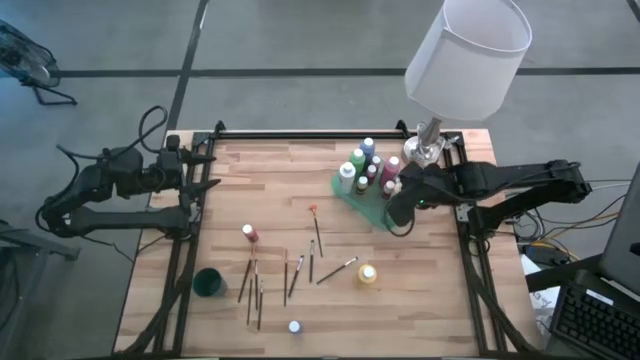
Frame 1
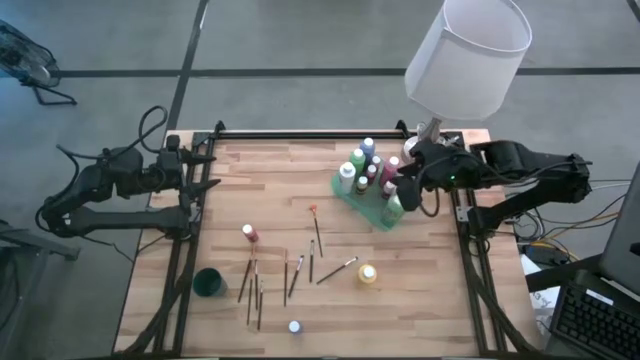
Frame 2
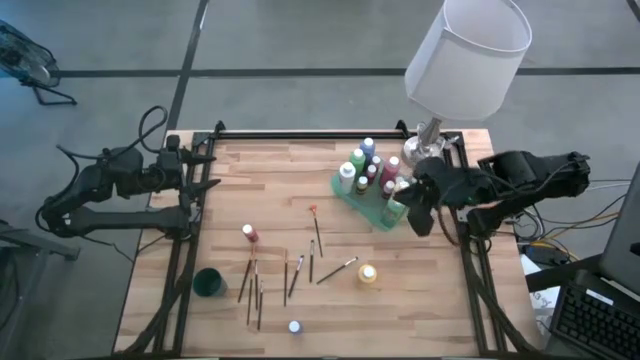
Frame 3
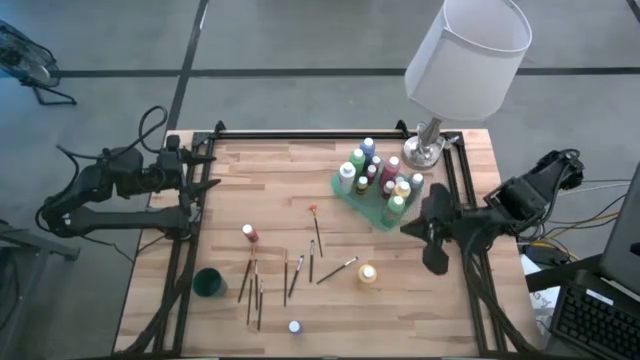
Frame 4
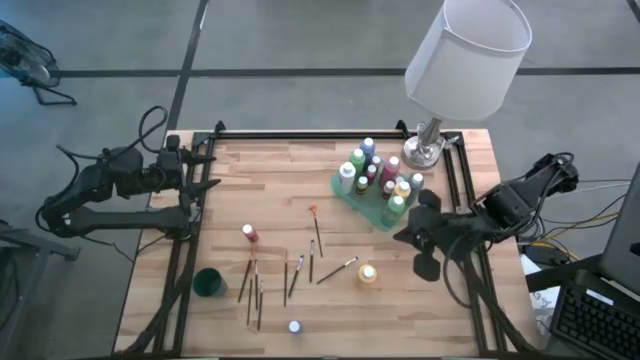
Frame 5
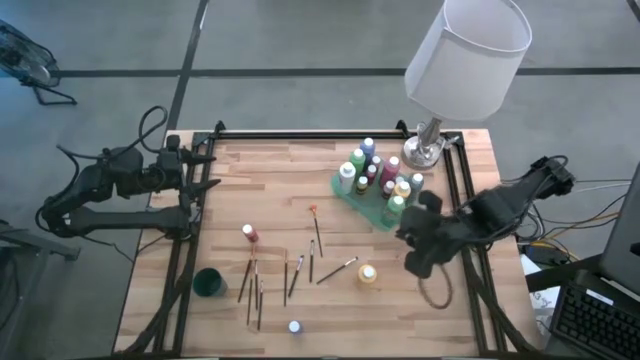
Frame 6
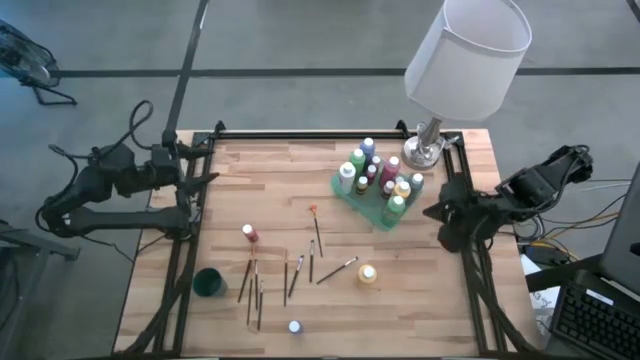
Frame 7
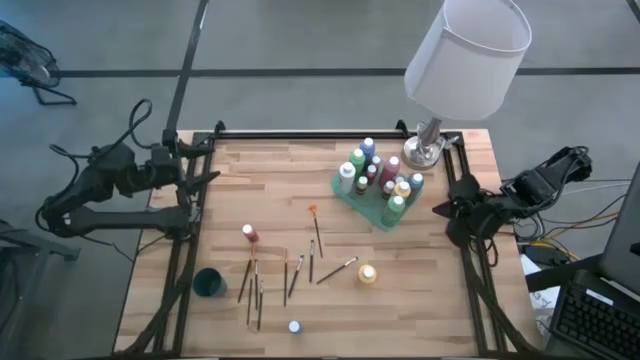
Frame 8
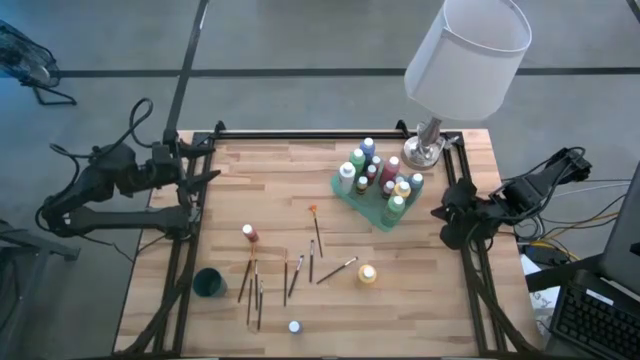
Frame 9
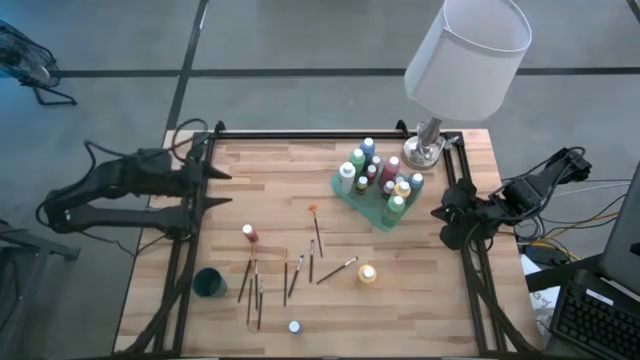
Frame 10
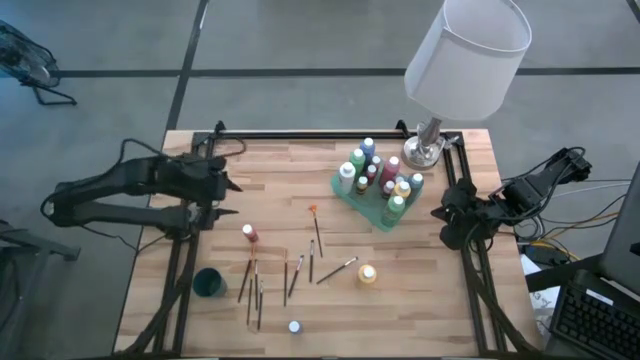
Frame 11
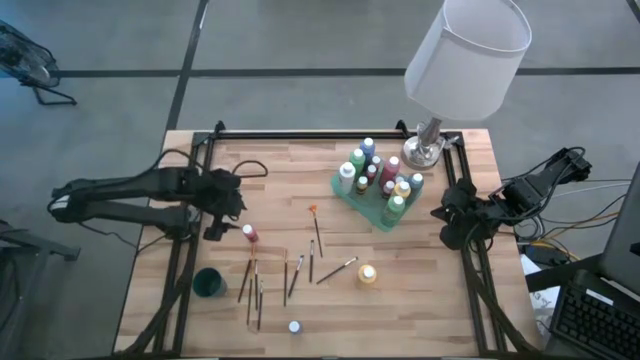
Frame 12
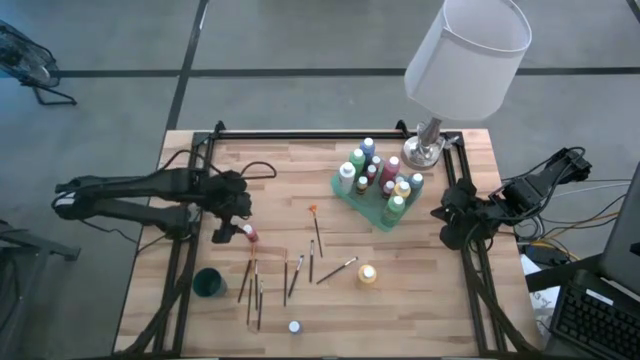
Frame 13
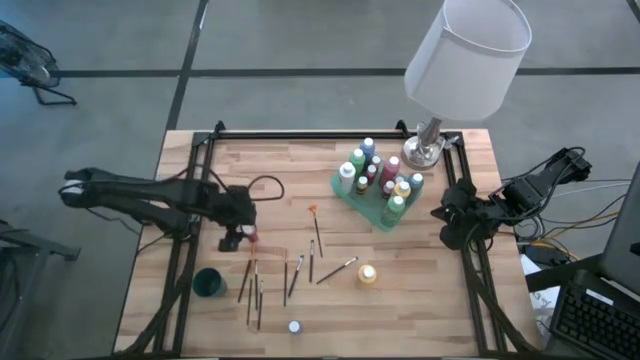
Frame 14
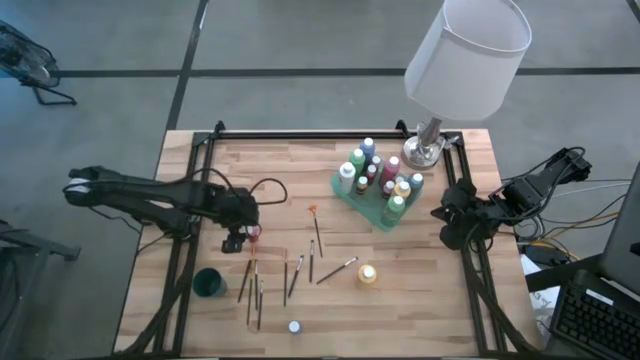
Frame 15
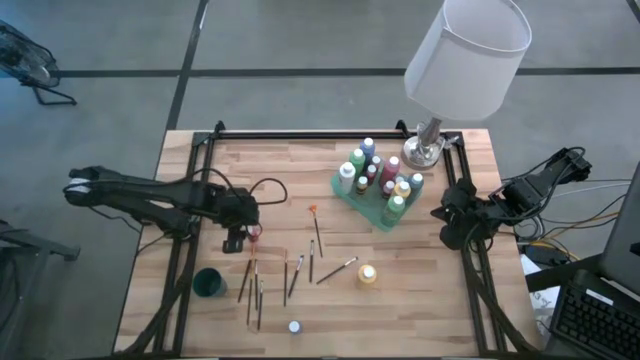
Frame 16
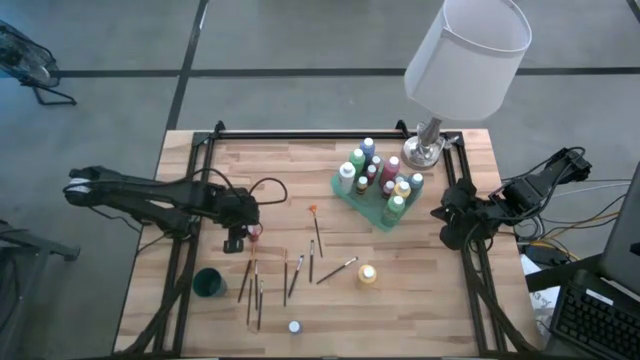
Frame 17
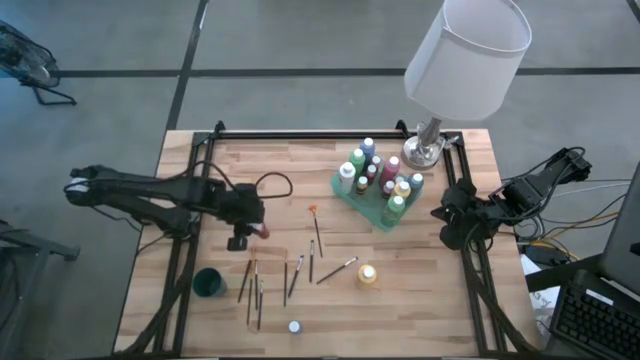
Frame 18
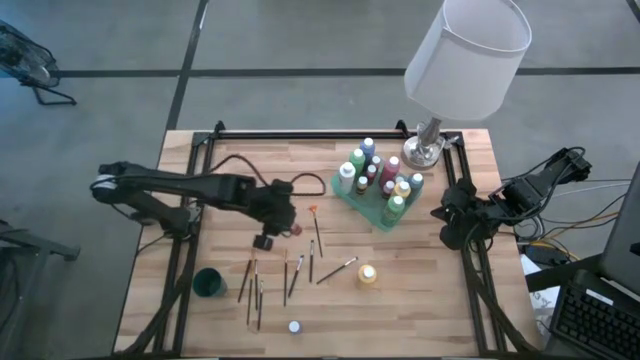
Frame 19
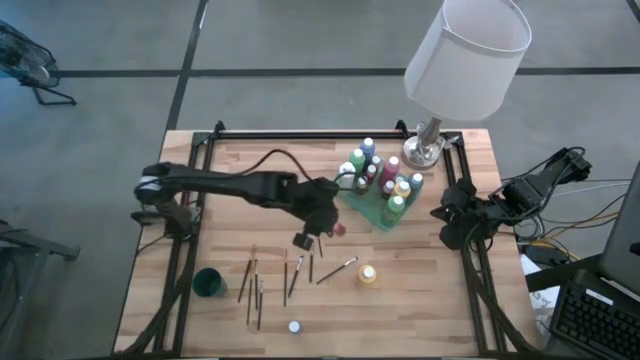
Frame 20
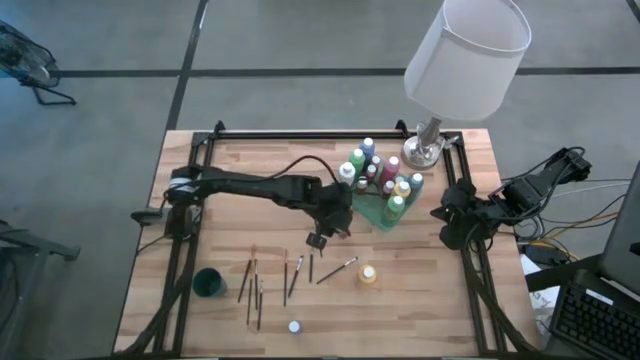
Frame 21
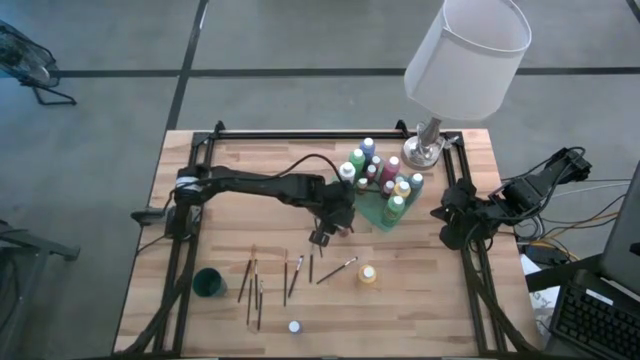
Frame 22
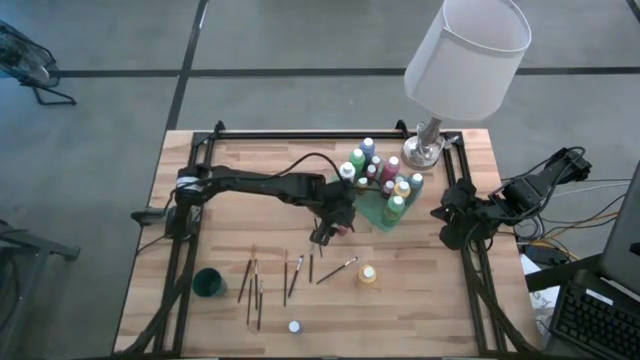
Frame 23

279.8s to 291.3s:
Task: Pick & Place Paint Supplies
Move the small orange paint bottle to the center of the table

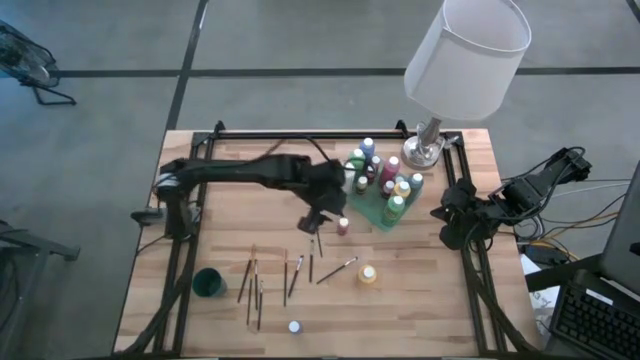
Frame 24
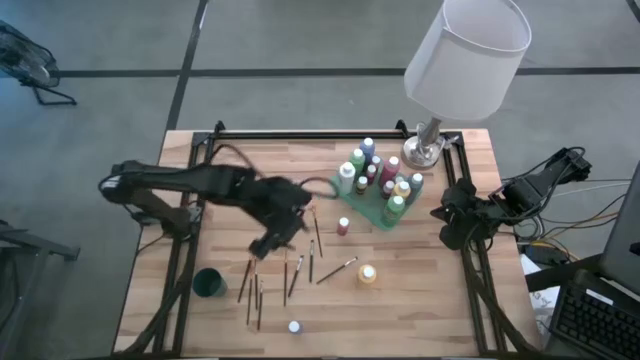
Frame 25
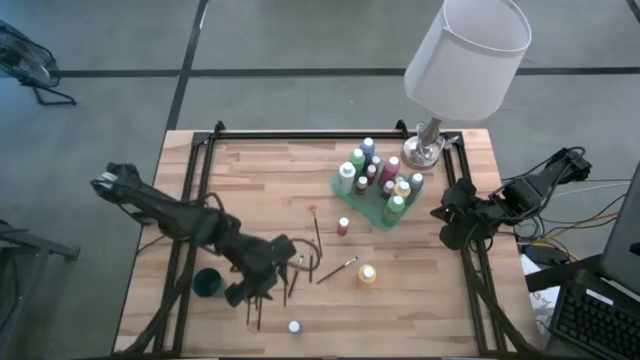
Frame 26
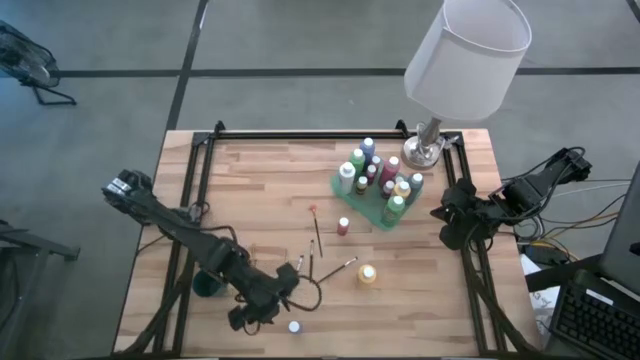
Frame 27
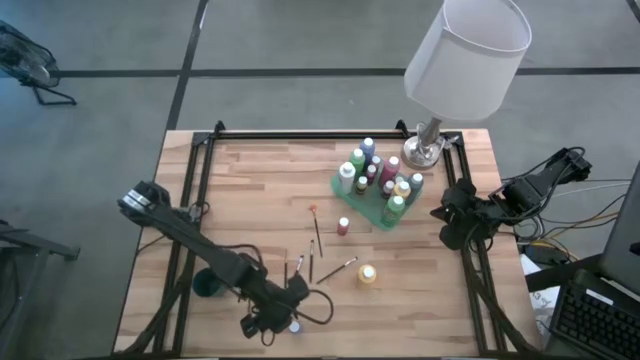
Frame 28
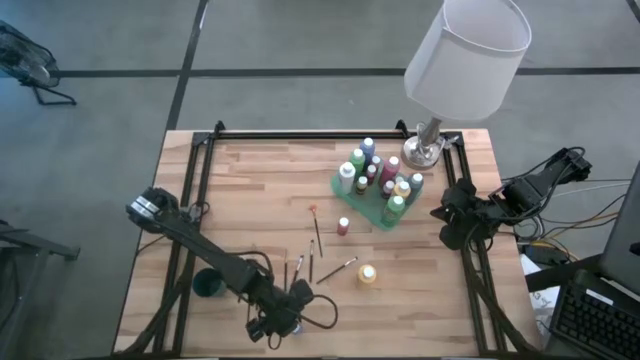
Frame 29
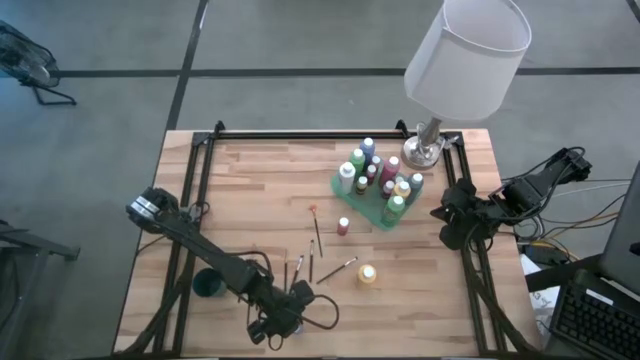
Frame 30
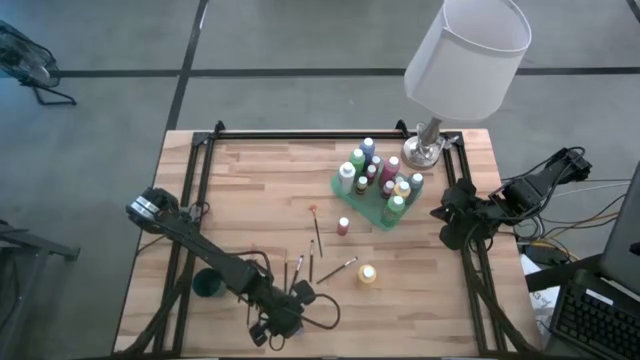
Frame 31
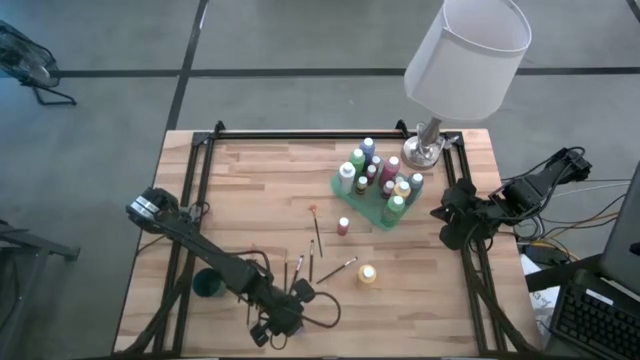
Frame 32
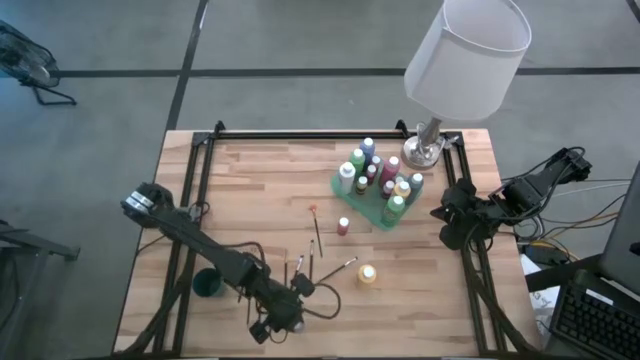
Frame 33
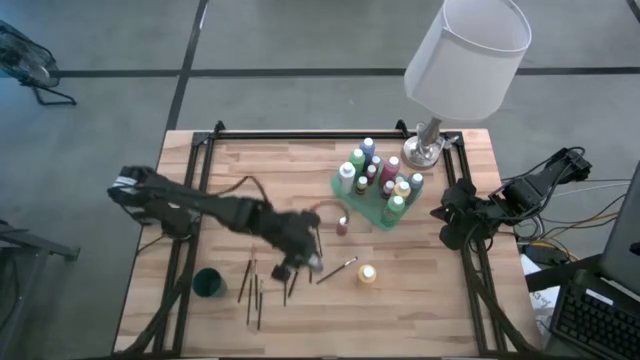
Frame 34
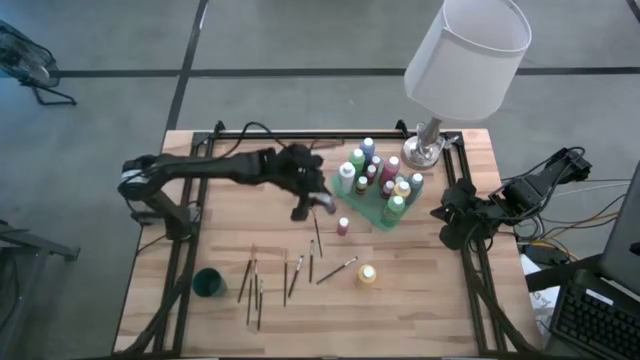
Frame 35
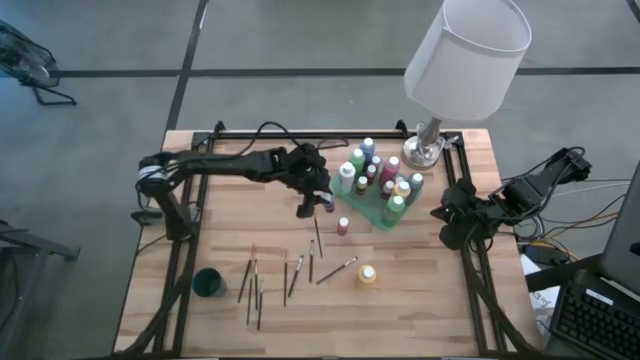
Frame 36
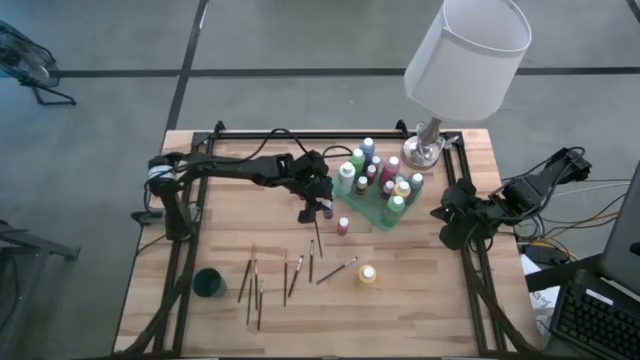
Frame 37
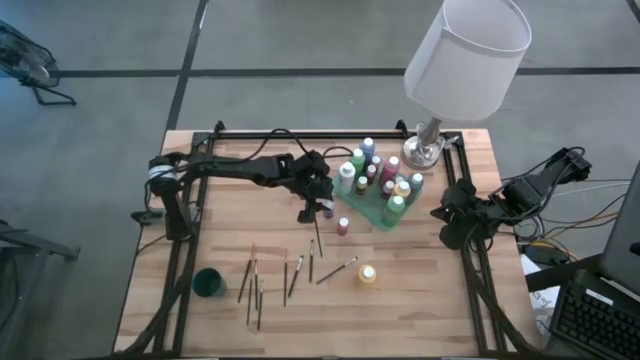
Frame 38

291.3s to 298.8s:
Move the small blue paint bottle to the center of the table

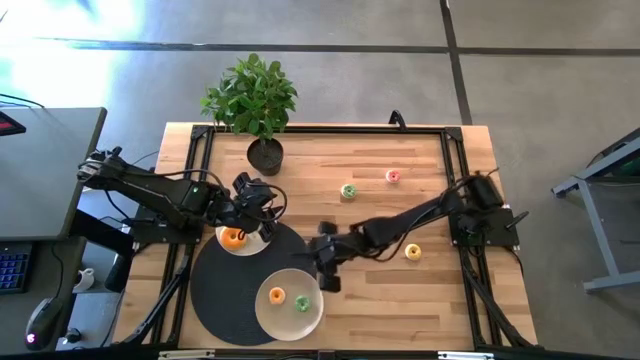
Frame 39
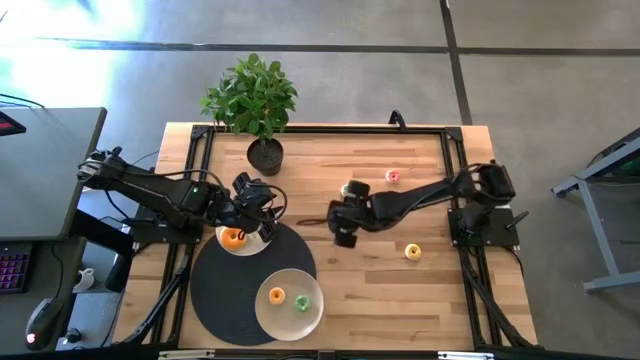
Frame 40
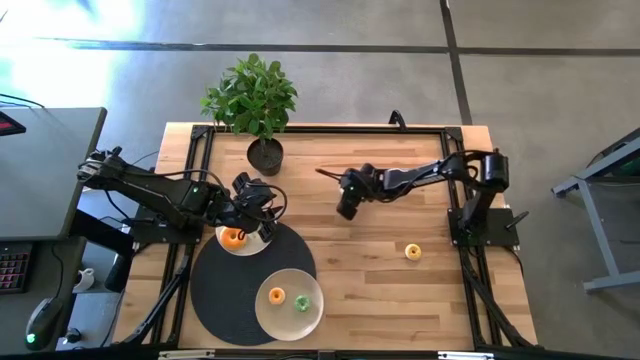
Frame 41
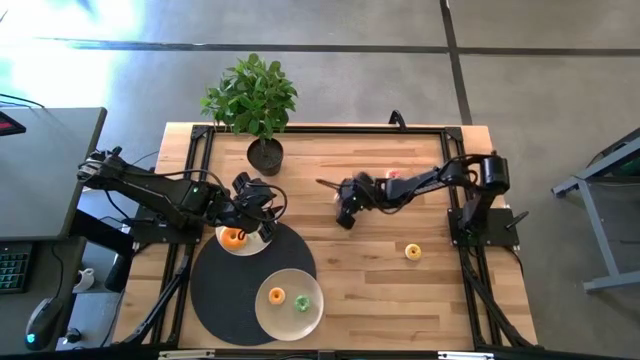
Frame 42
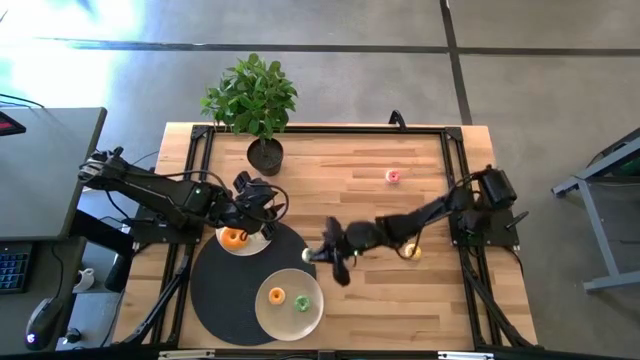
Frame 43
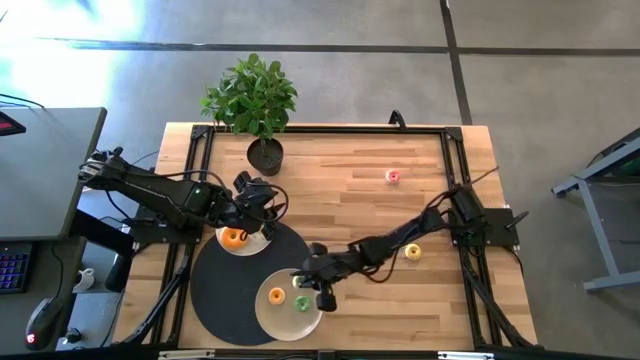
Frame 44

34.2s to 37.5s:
Task: Pick & Place donuts
Put the small green donut on the light brown plate
